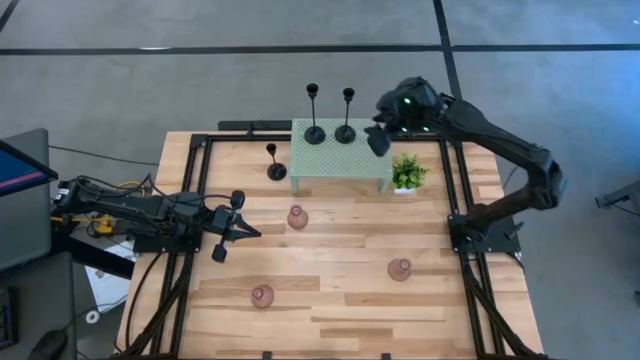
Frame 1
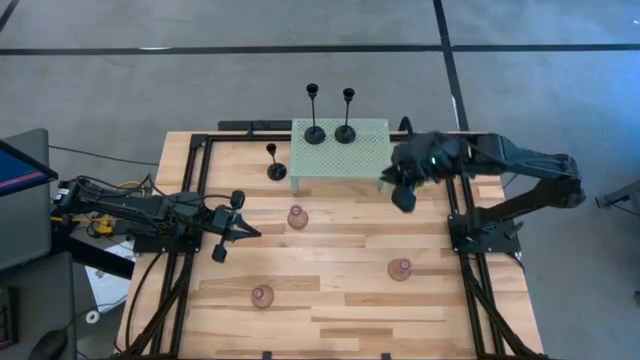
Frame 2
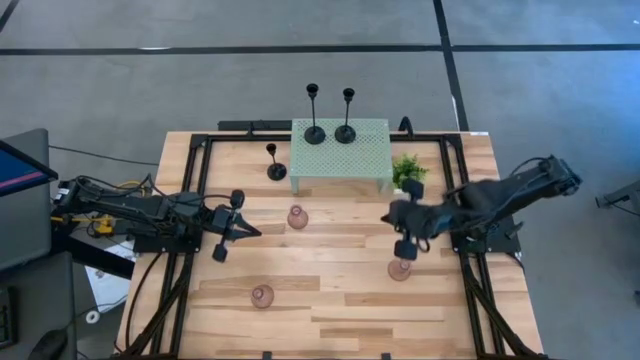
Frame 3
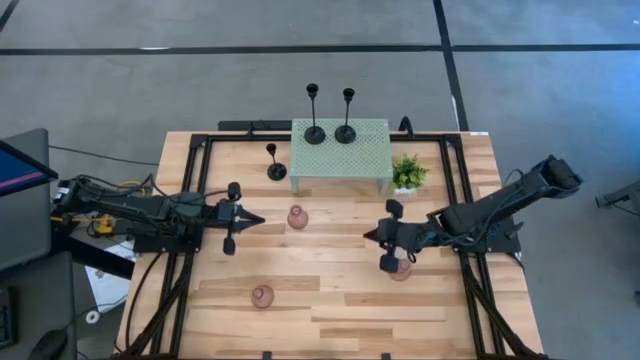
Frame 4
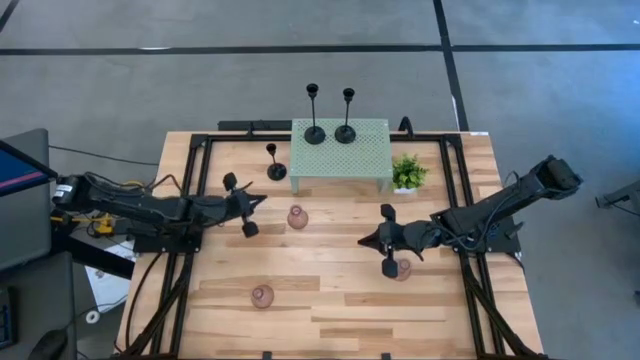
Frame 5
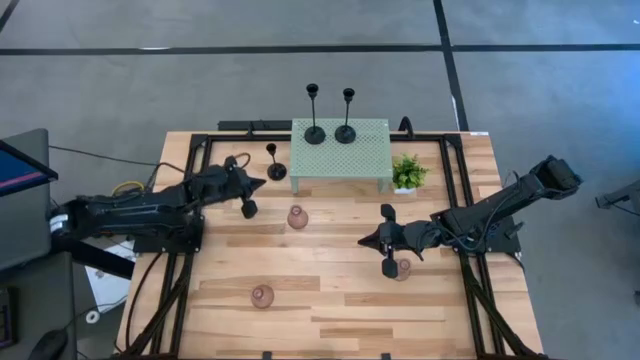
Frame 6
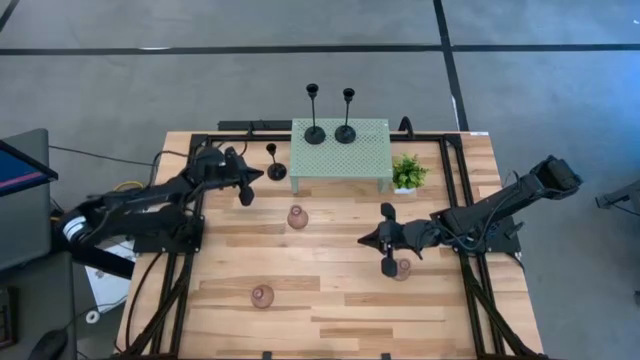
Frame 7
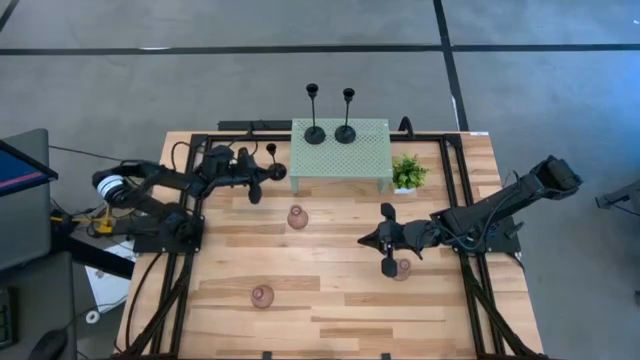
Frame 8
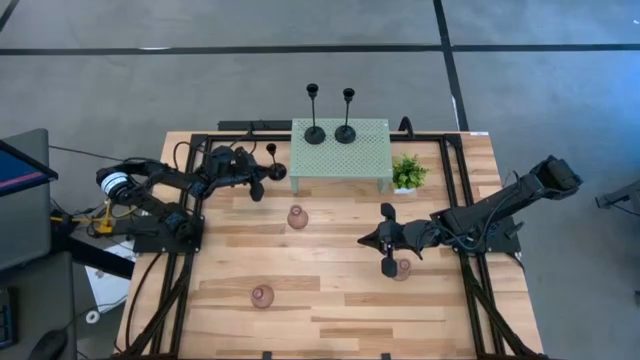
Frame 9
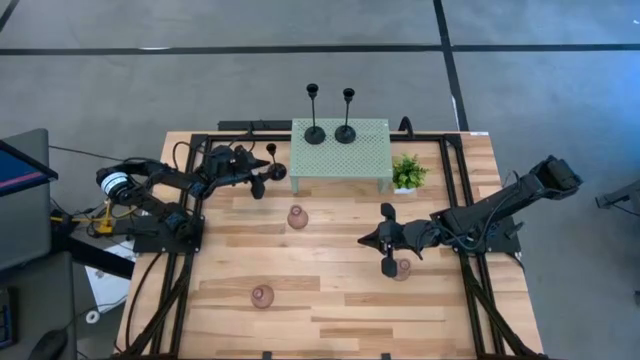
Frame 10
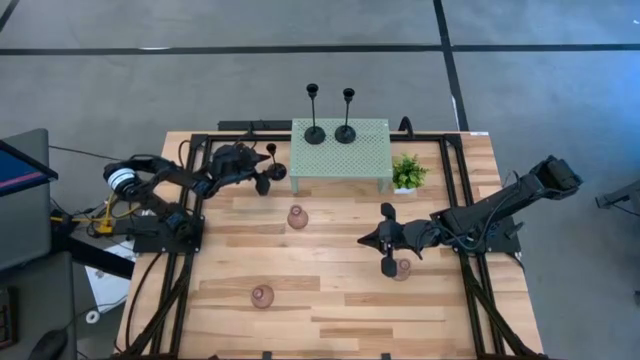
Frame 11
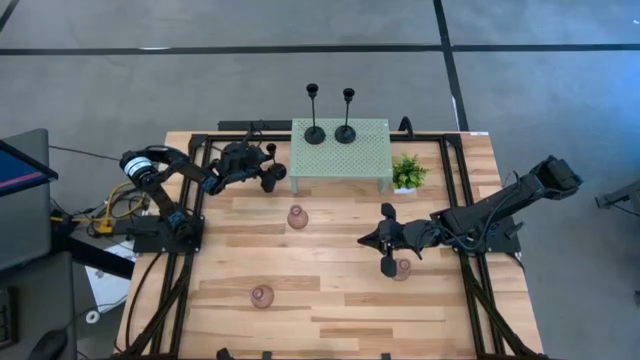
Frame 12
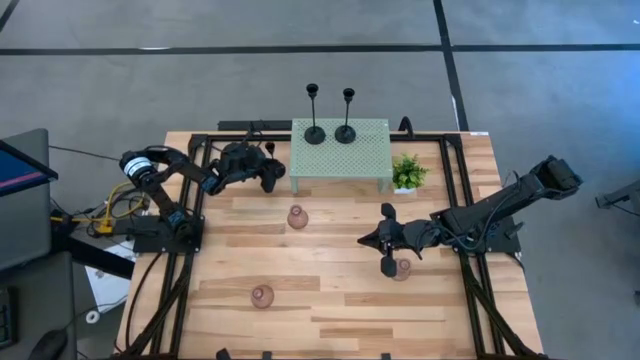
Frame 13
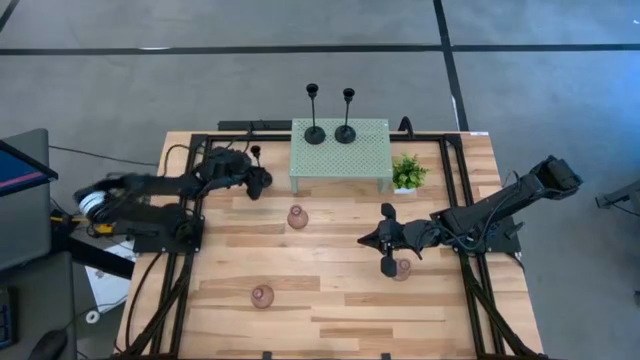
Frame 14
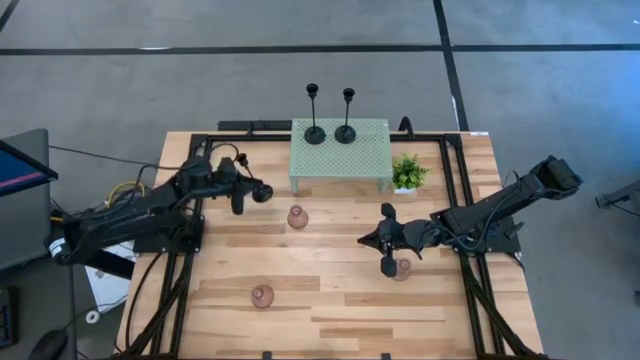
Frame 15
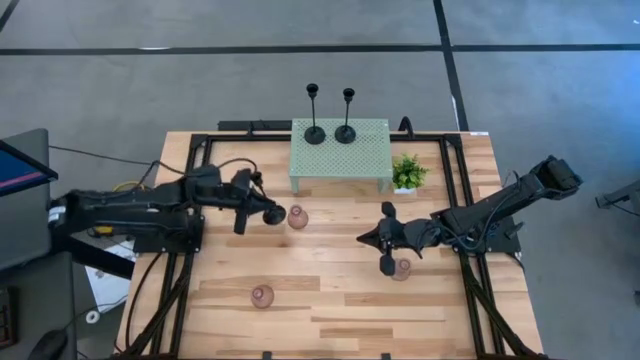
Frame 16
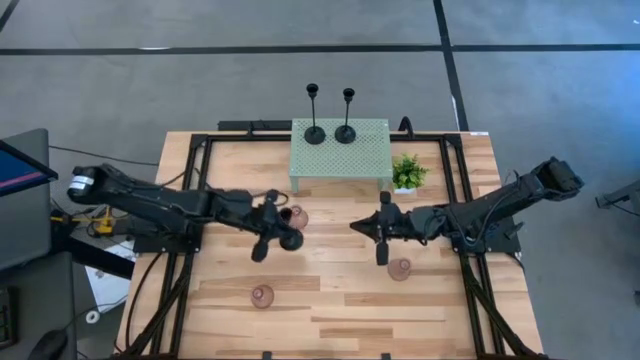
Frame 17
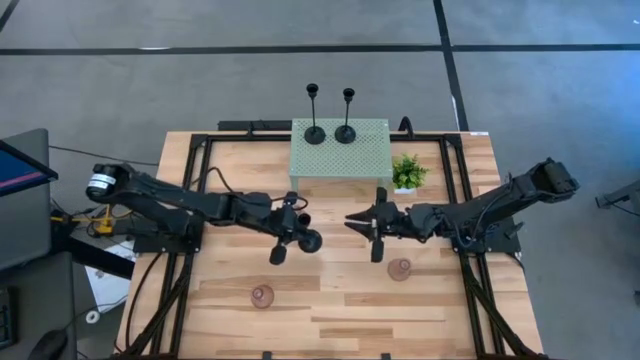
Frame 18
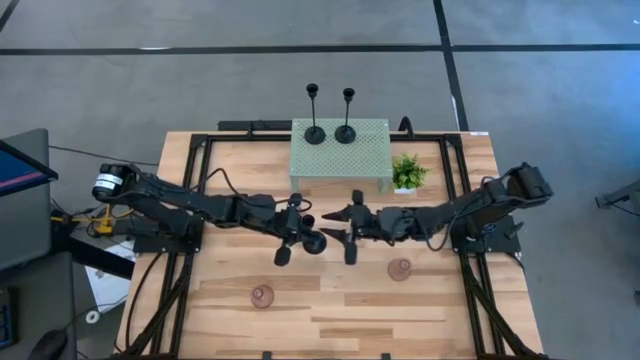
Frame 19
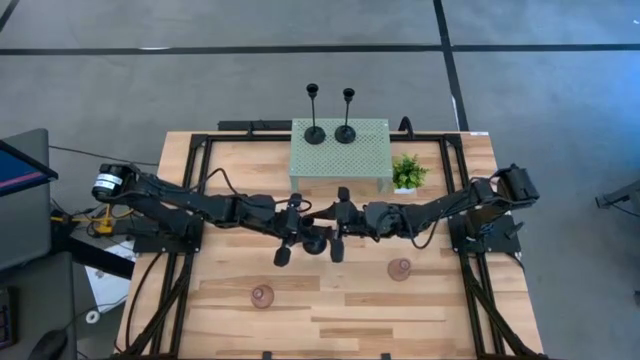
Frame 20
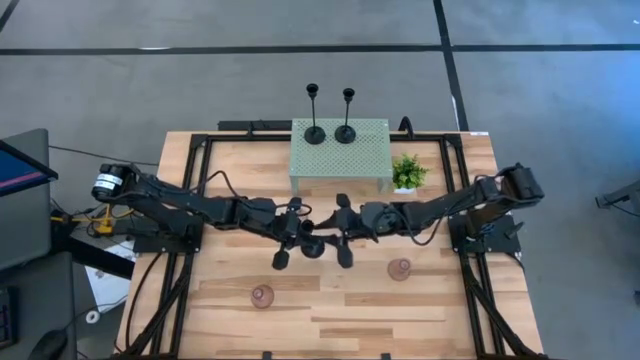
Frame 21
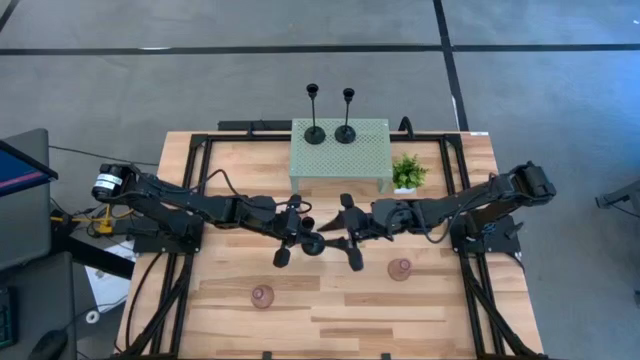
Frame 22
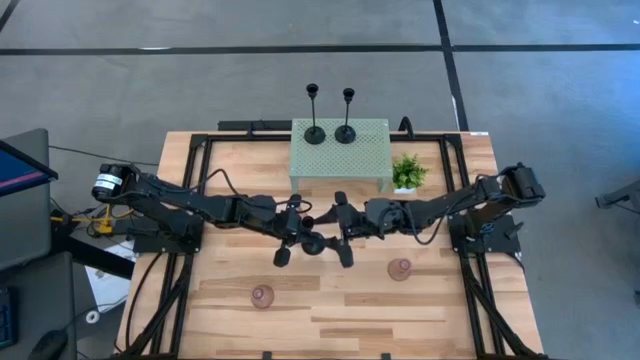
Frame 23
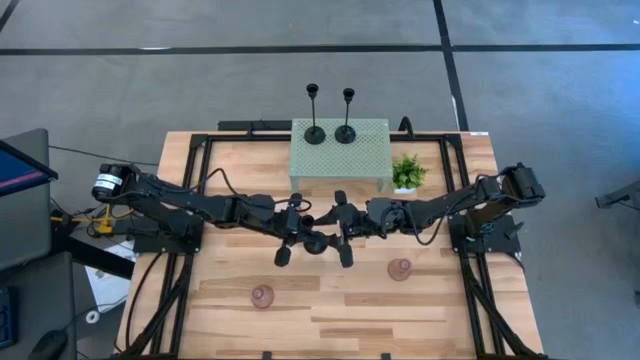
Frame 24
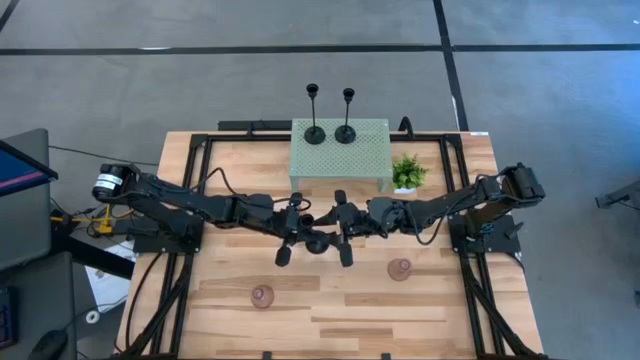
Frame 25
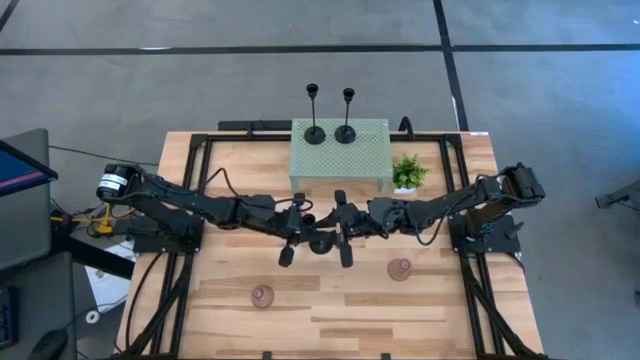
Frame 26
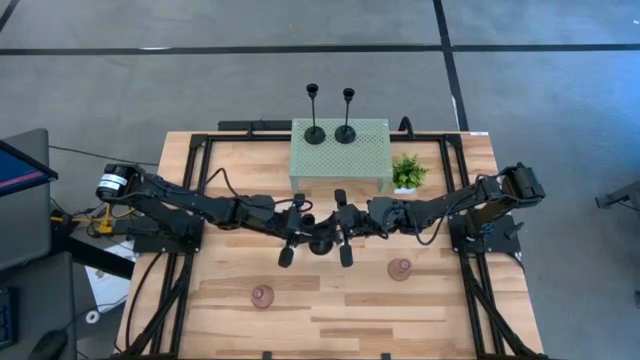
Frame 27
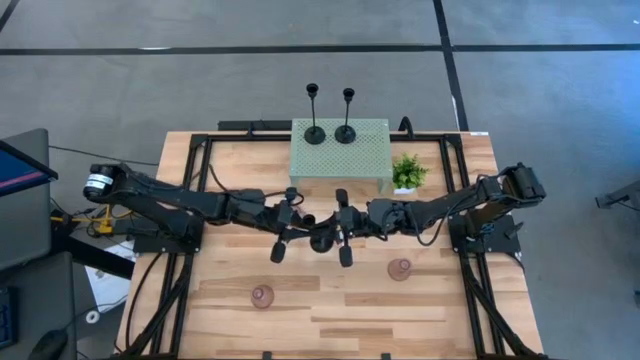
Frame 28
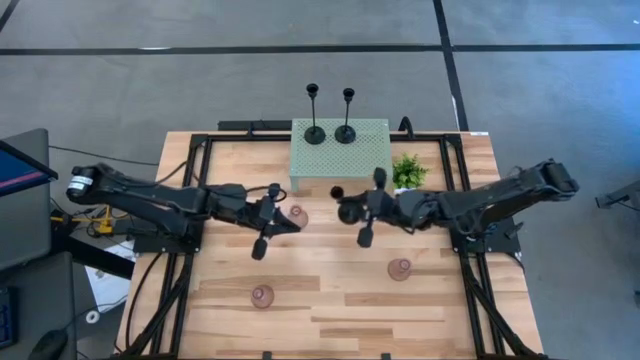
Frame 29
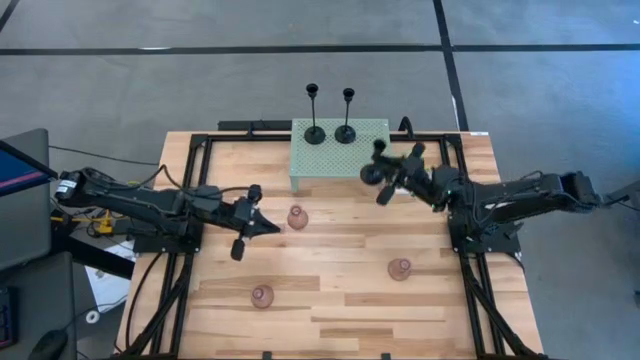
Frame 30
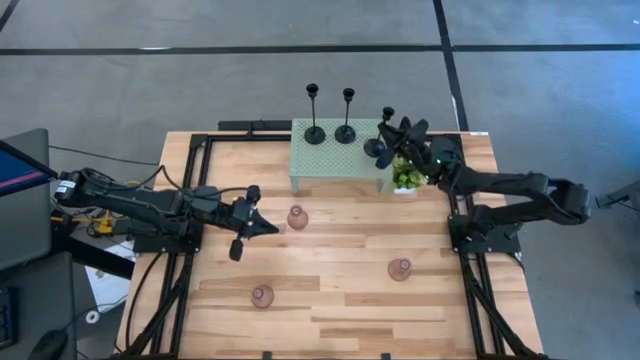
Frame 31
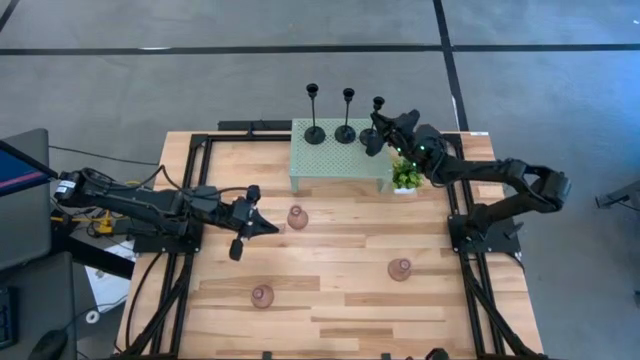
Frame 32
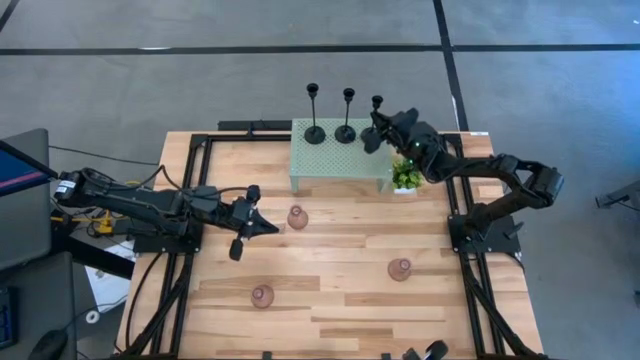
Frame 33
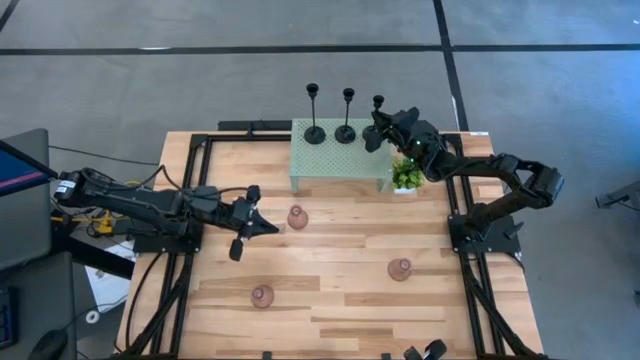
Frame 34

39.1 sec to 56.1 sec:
Task: Pick & Place candle stick holders
Put the black candle holder on the shelf aligned with the black candle holders
